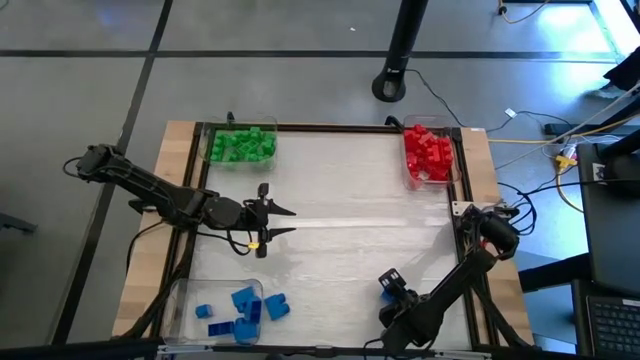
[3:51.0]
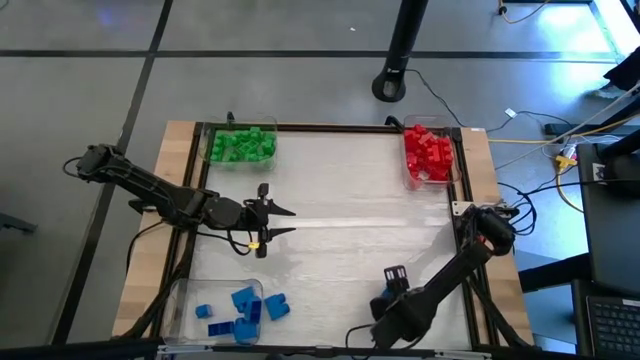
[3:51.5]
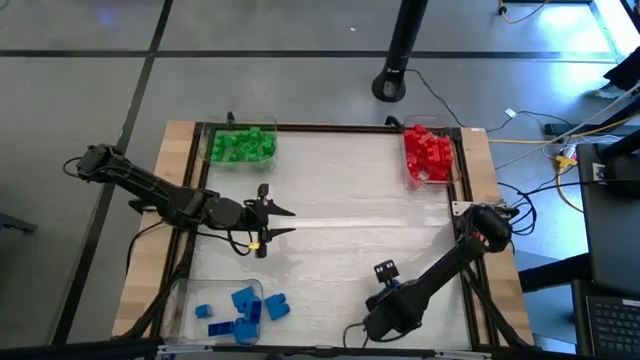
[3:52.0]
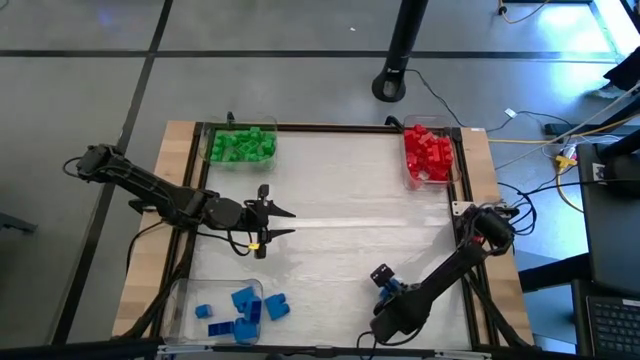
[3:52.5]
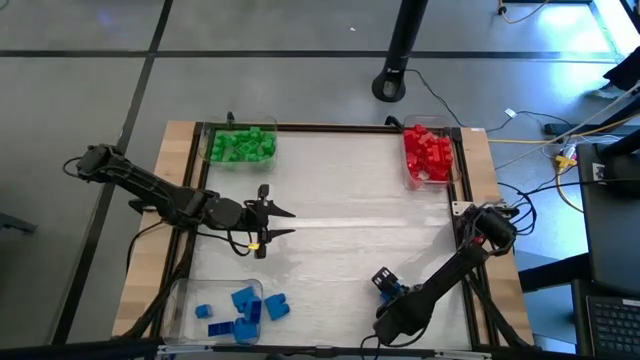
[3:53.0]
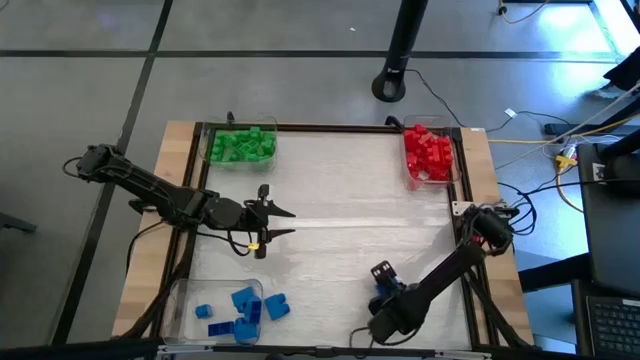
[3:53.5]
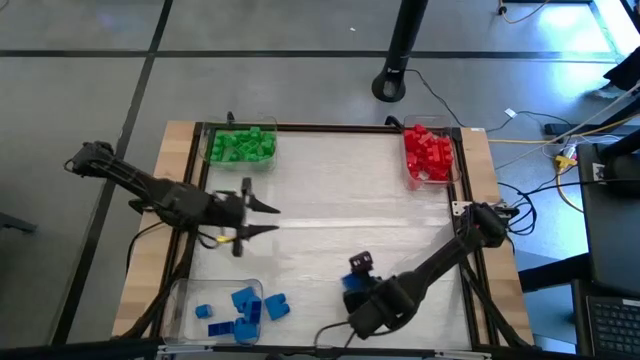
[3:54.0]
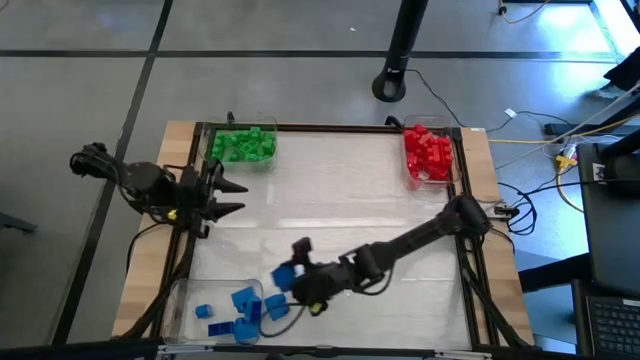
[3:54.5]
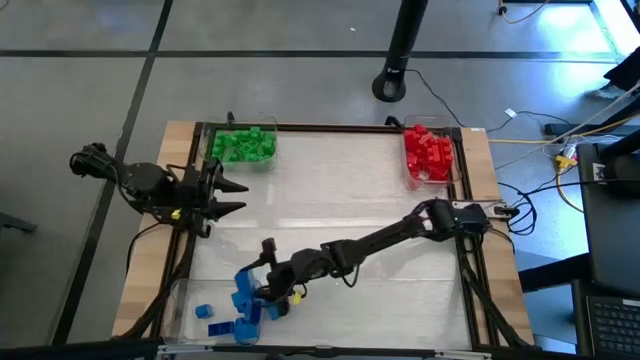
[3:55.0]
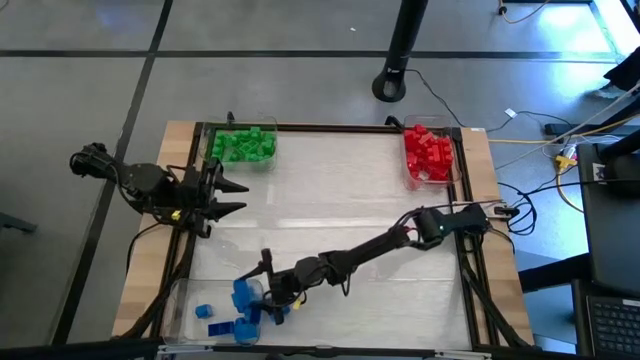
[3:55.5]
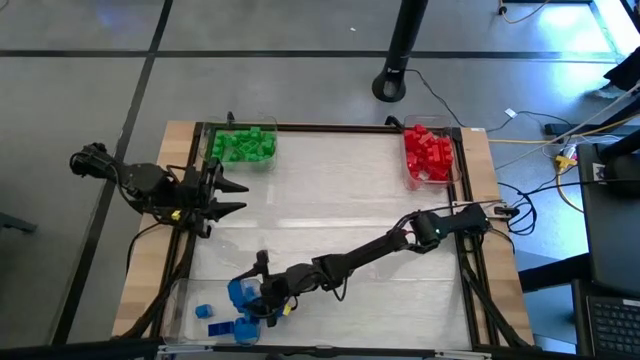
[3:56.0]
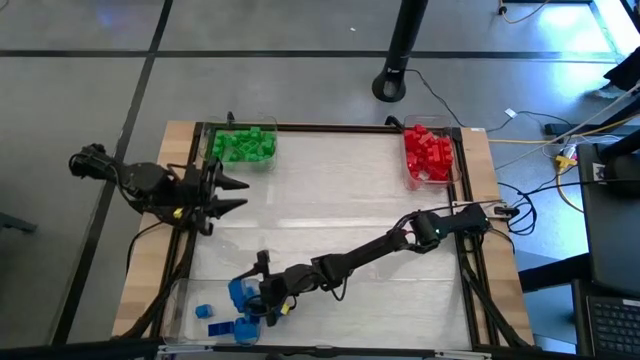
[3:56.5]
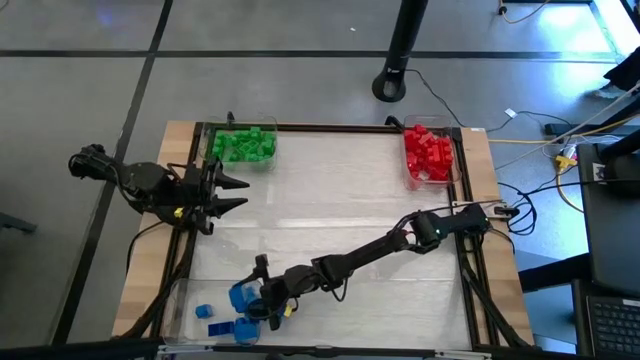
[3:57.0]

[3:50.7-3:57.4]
Task: Sort blocks
Put the blue game piece into the bottom transparent bin

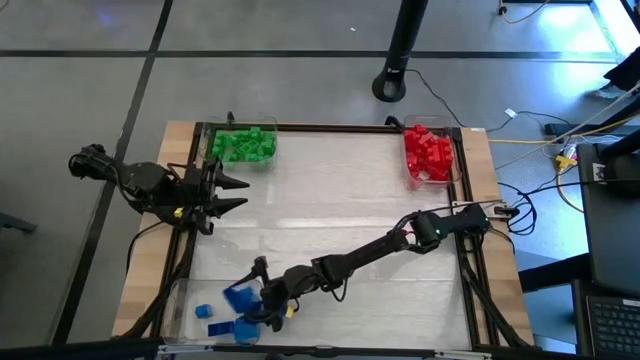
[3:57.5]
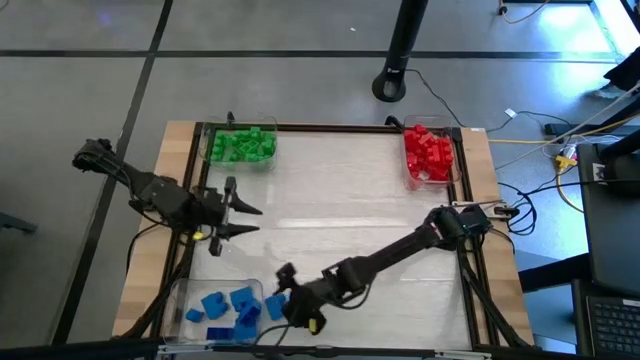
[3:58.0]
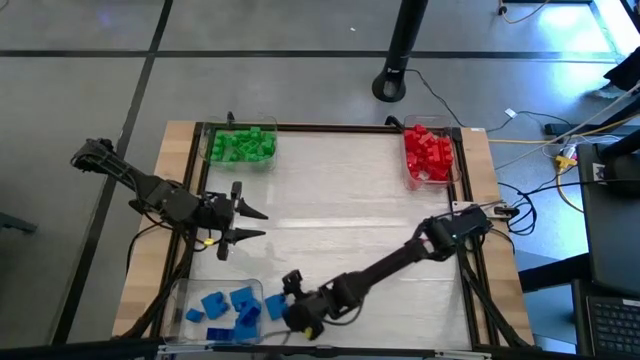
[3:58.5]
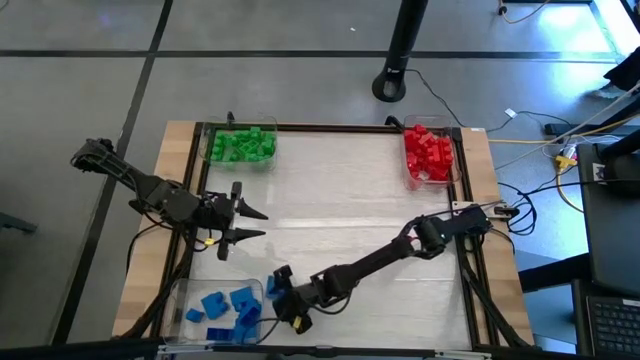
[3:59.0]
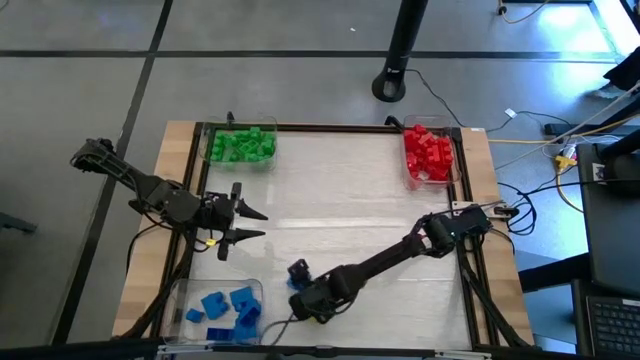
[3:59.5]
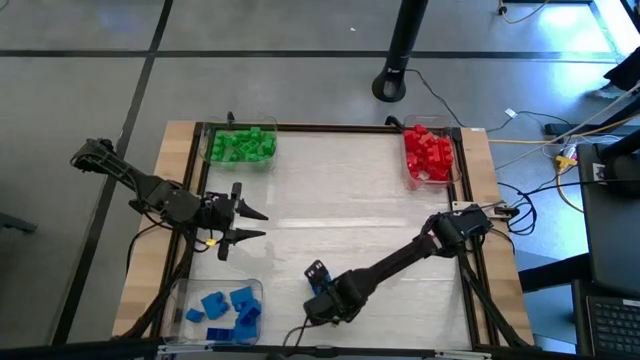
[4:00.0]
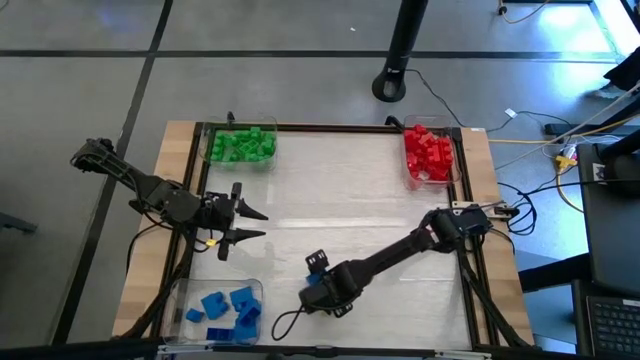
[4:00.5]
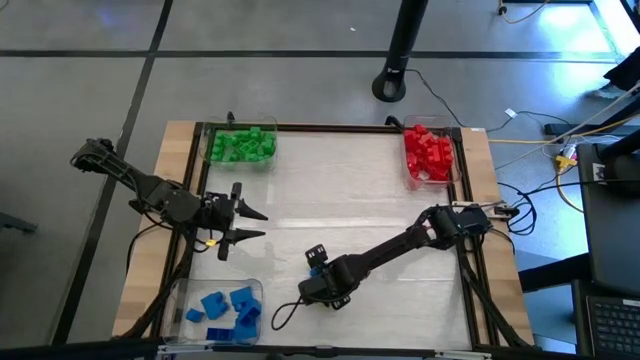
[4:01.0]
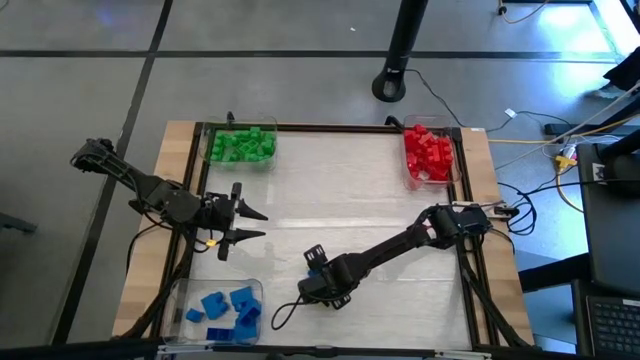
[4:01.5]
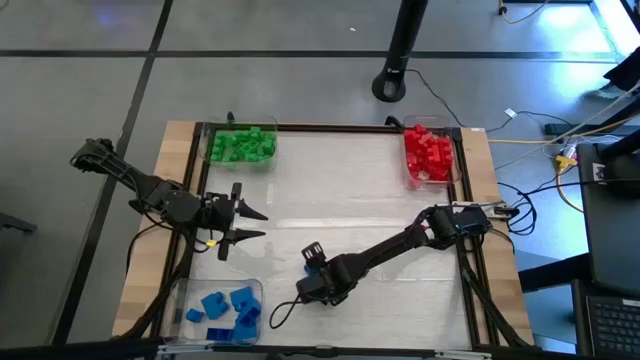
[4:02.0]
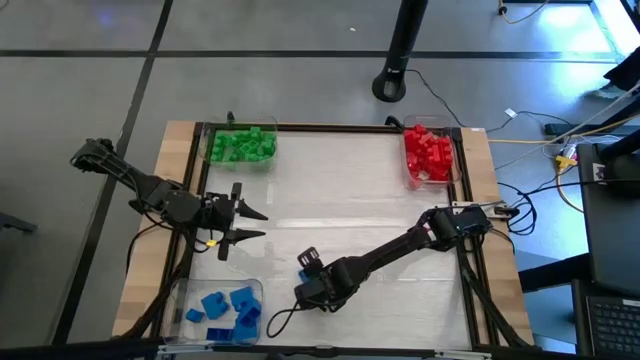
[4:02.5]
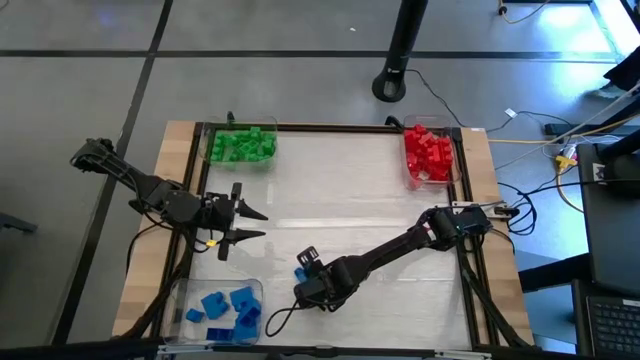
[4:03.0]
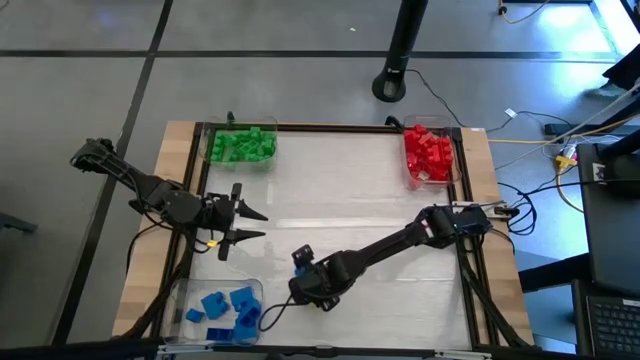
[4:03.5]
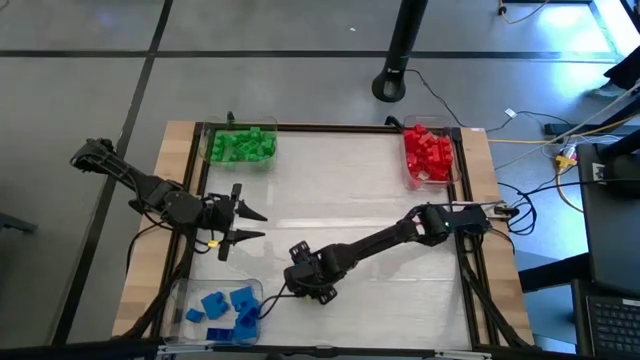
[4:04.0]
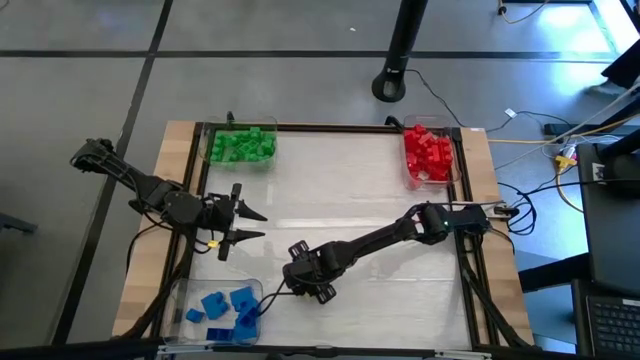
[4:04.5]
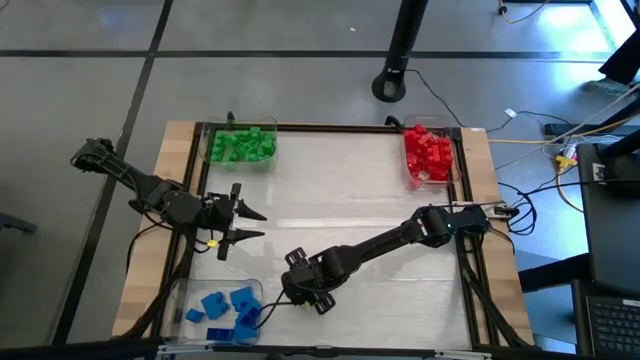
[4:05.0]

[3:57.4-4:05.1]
Put the blue game piece into the bottom transparent bin

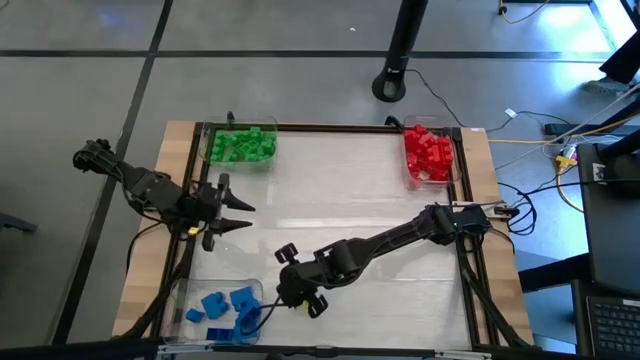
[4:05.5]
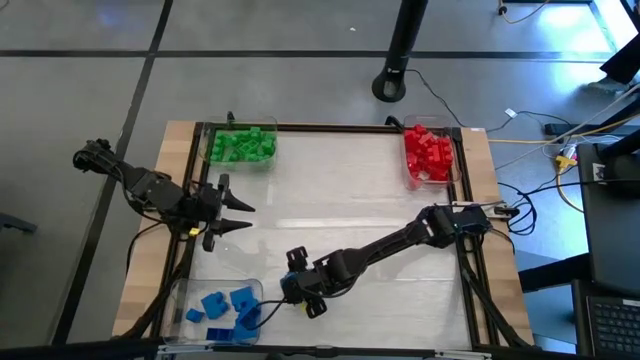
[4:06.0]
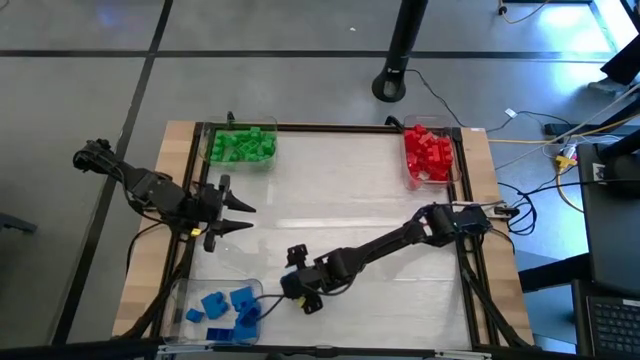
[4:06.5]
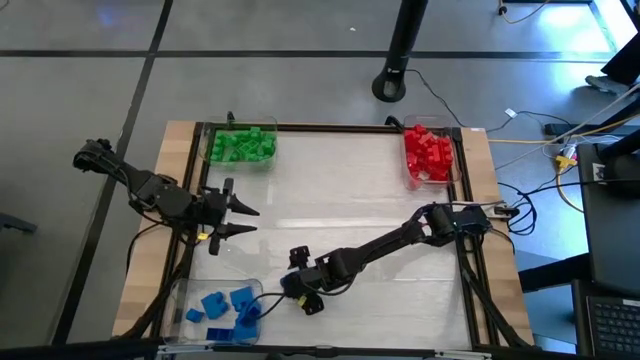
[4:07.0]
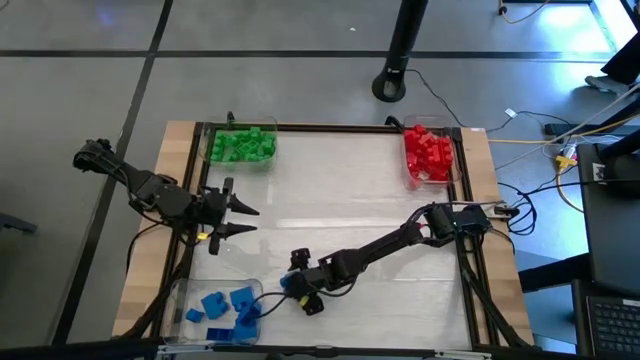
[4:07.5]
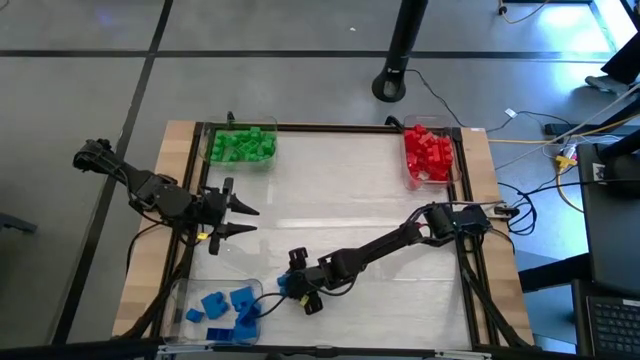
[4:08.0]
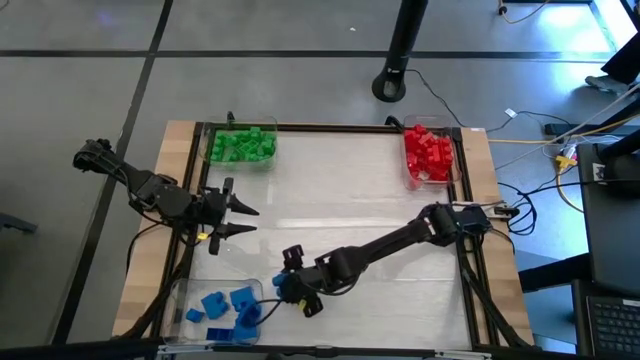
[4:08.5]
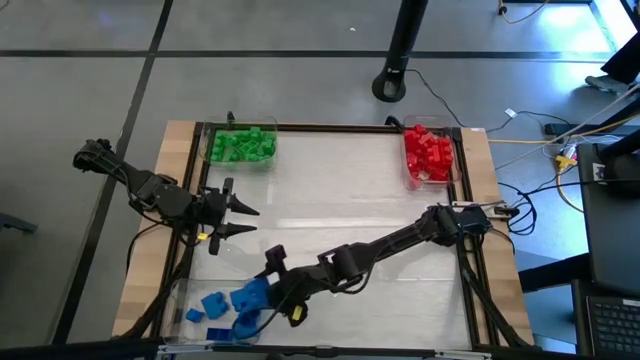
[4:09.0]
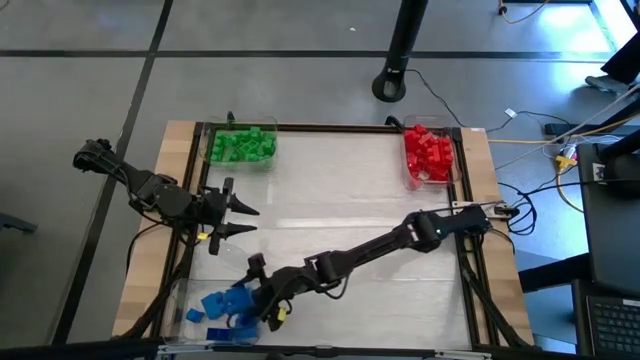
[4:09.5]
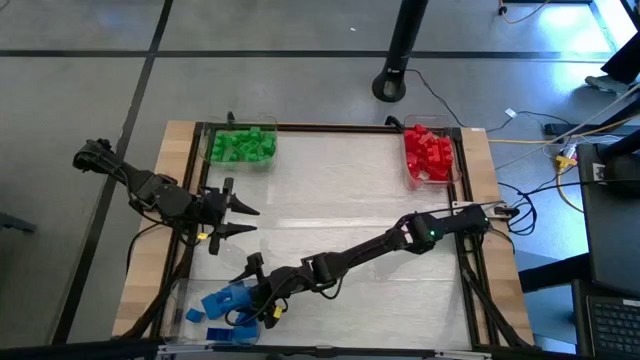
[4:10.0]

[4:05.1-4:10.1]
Put the blue game piece into the bottom transparent bin

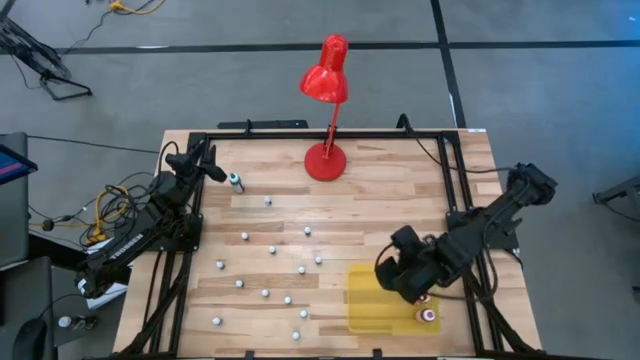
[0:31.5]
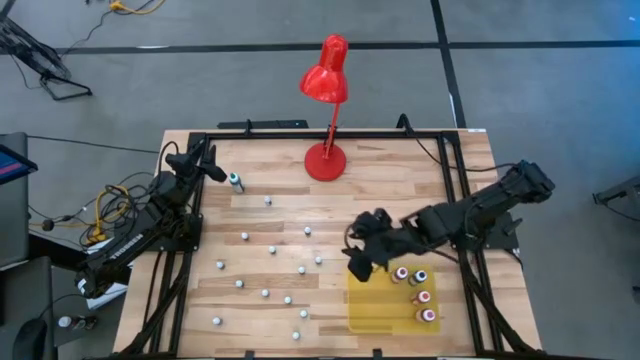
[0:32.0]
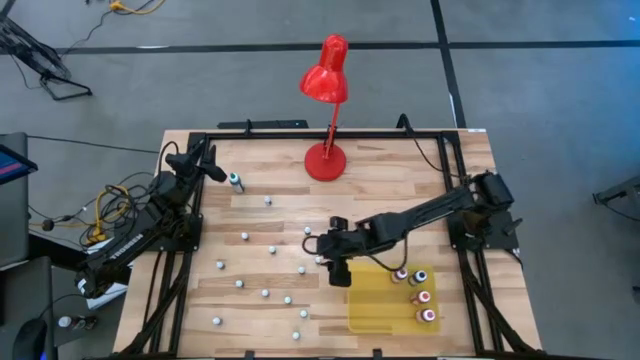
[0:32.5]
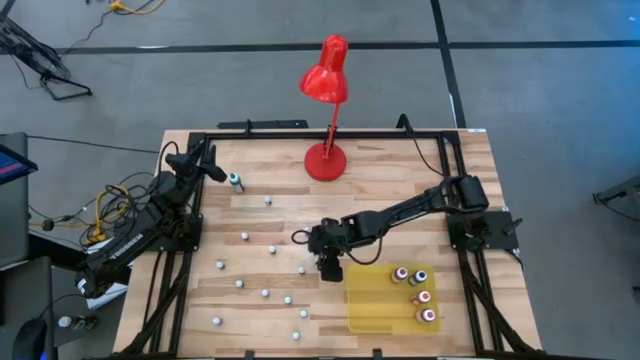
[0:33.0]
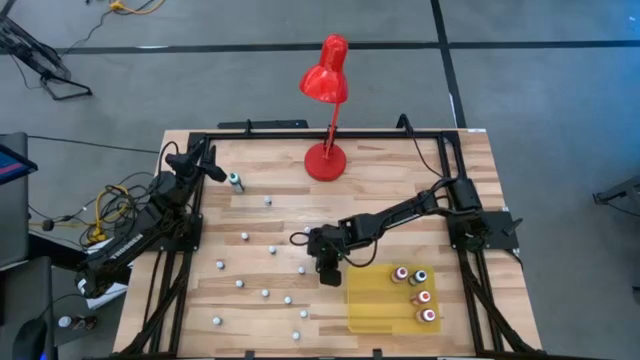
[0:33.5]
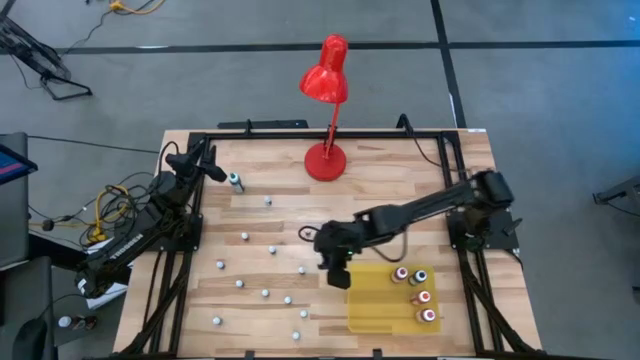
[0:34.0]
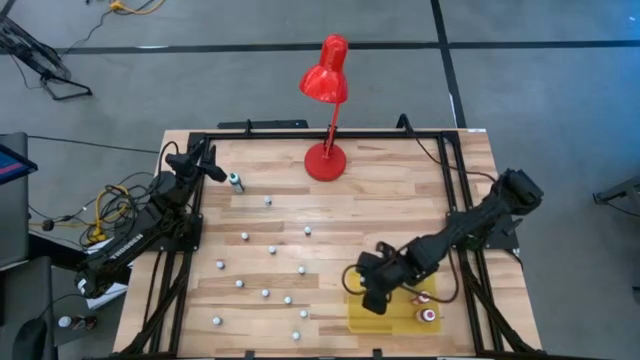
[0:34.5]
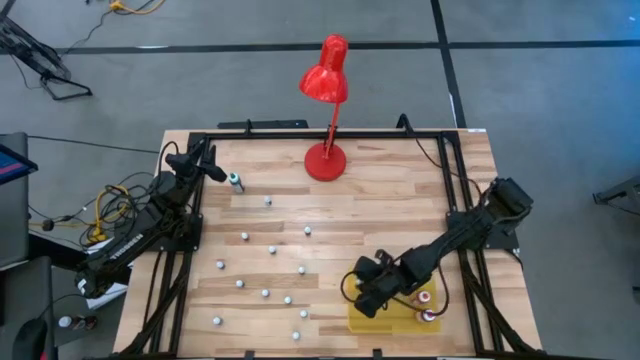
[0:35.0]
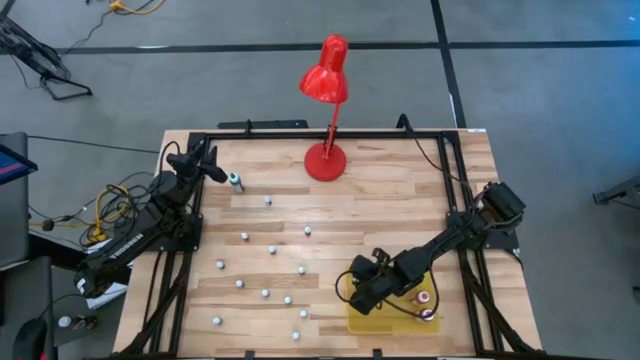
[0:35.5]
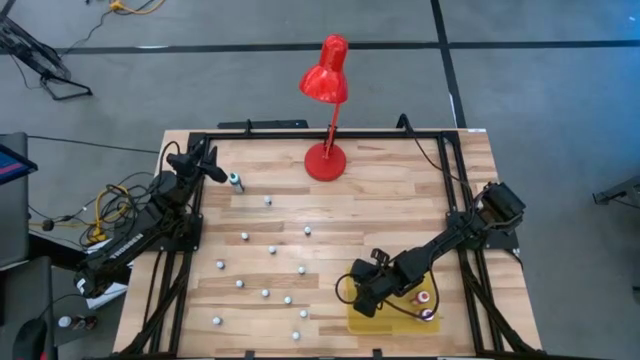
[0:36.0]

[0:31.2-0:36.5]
Task: Pick & Place food coloring
Put the brown food coloring into the yellow bin
